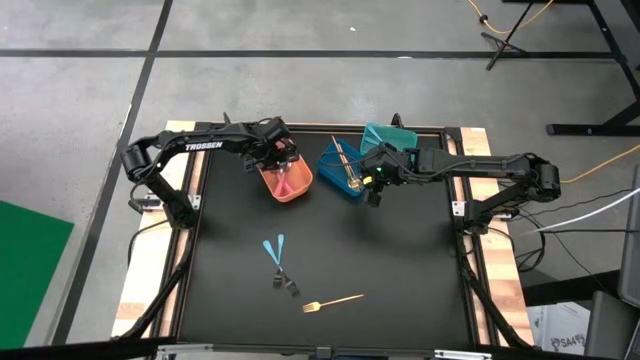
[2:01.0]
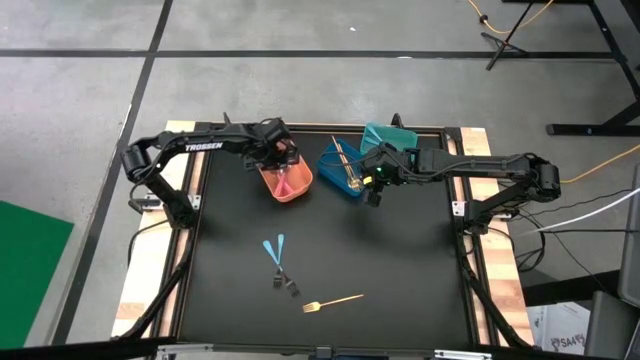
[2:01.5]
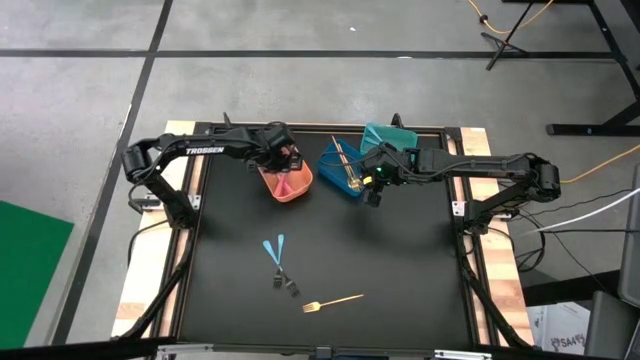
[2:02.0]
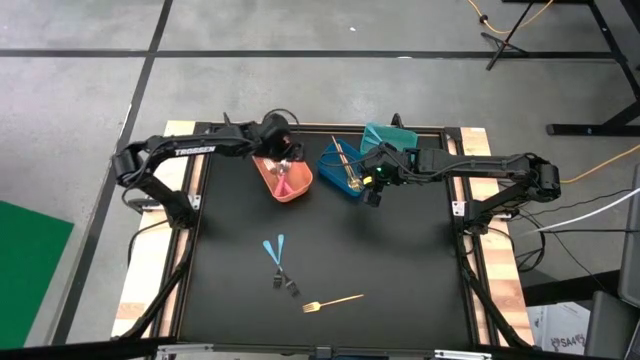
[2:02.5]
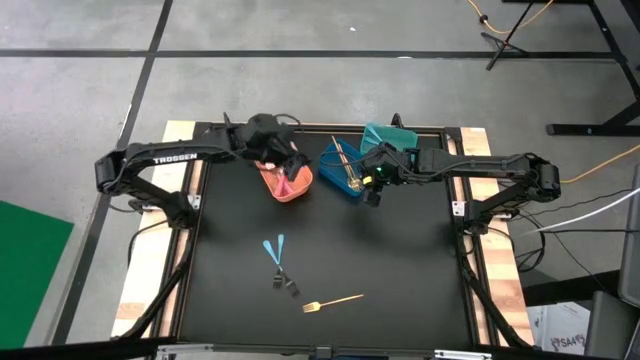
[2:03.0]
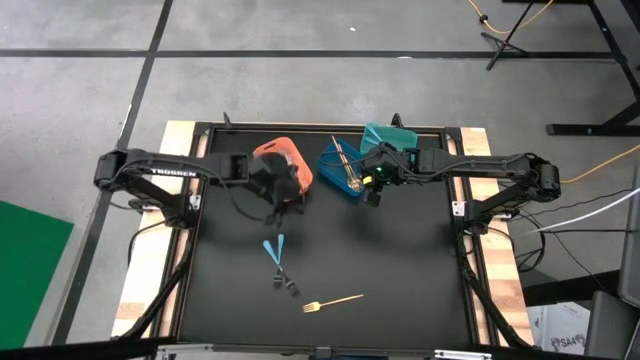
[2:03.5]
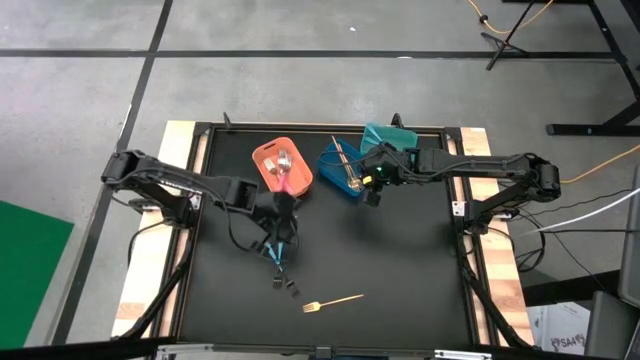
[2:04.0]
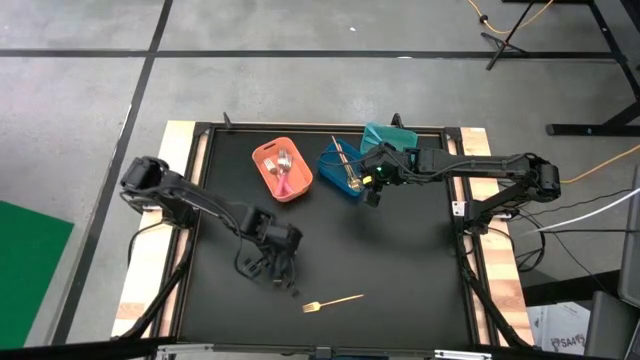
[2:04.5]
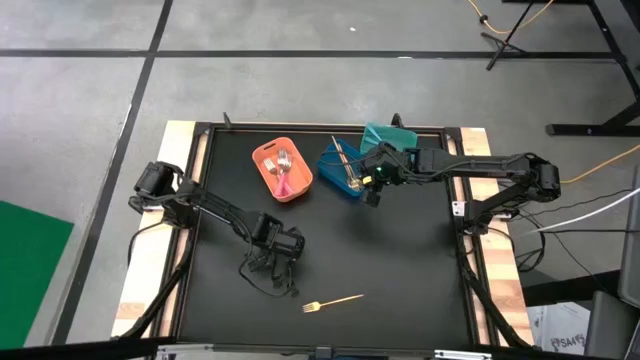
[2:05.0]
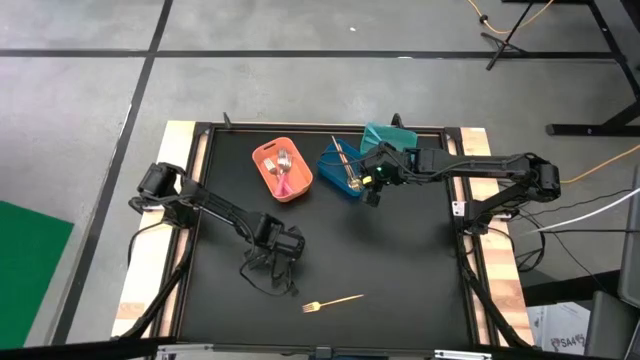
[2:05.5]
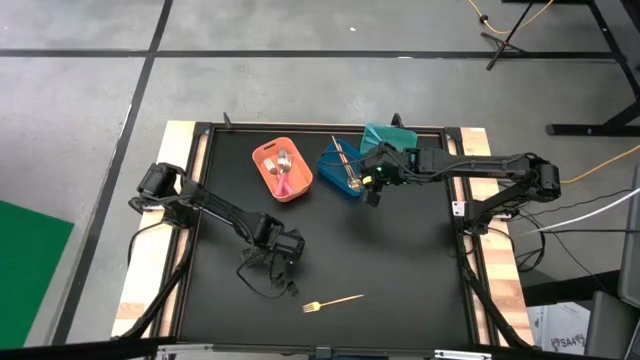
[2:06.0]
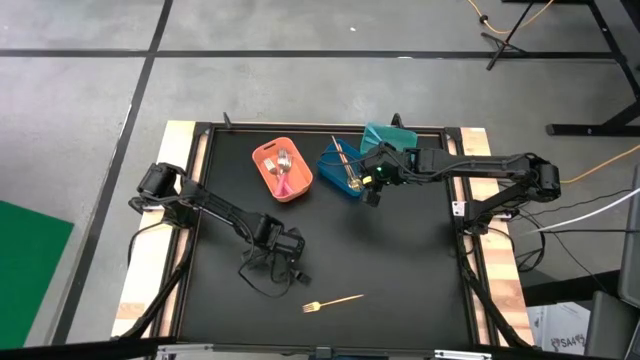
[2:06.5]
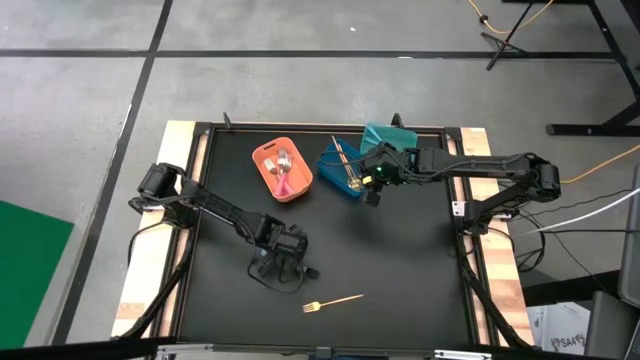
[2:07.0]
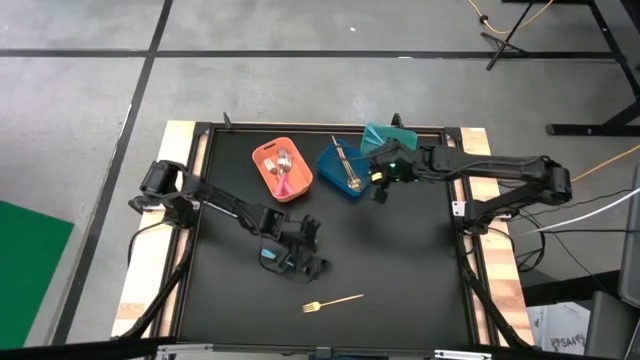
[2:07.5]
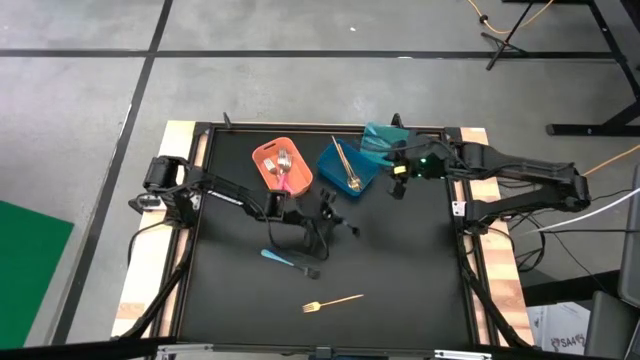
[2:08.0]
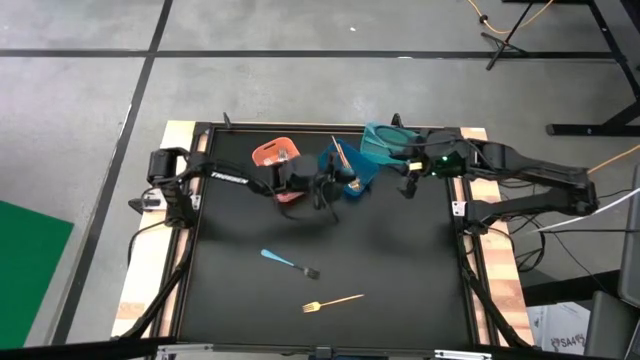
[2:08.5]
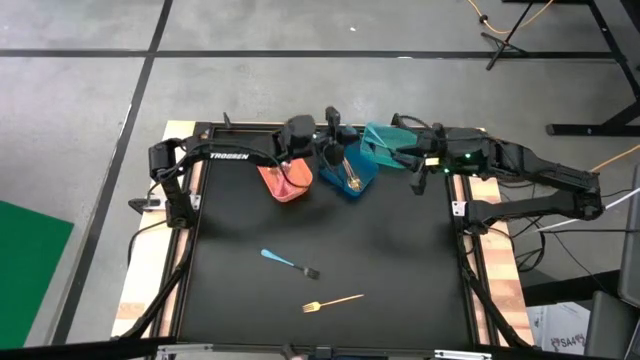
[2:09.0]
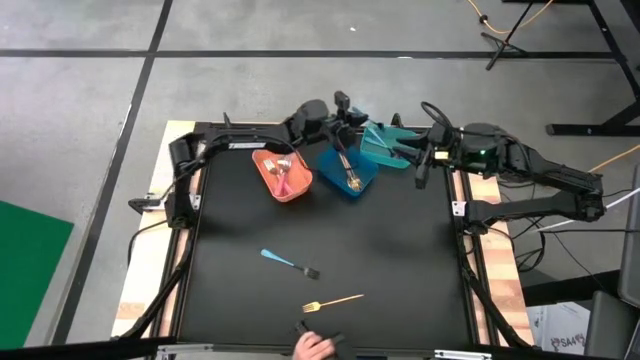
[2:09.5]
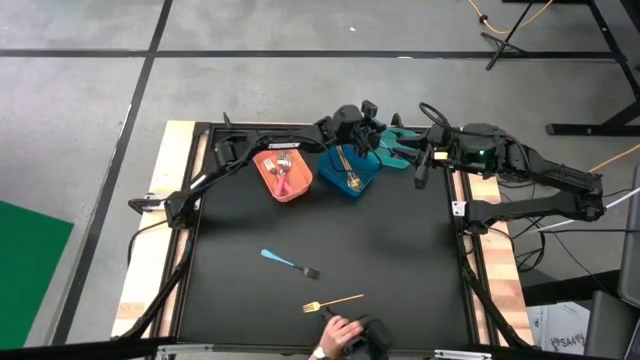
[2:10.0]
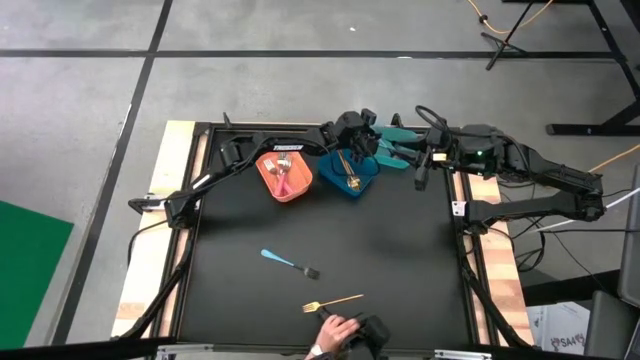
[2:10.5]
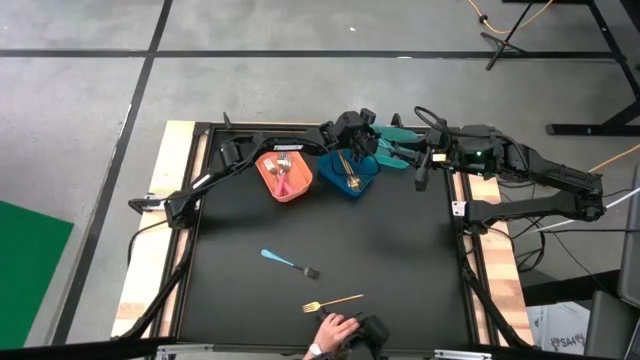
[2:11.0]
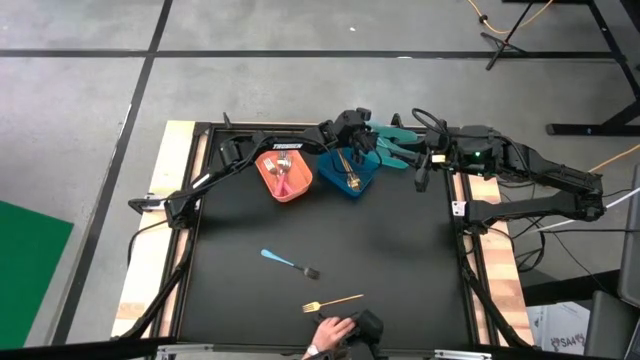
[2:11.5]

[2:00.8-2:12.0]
Task: Sort silverware by color (type)
Put the blue fork into the green bin

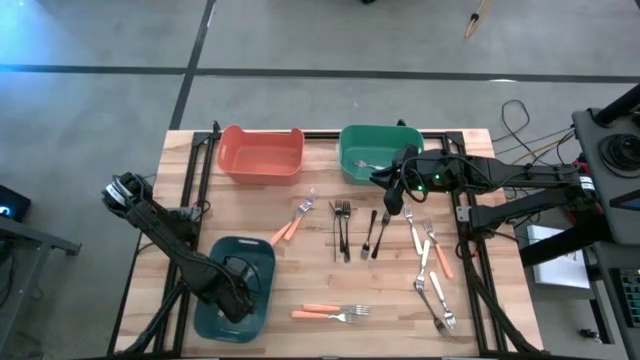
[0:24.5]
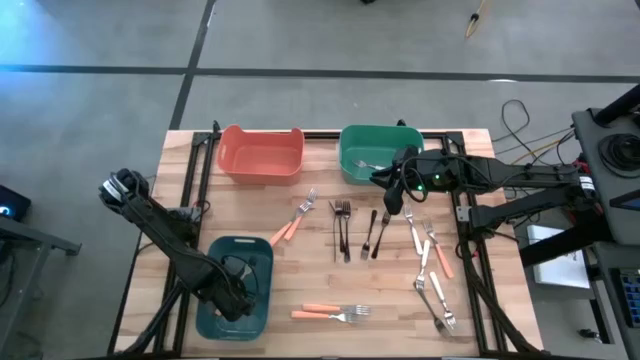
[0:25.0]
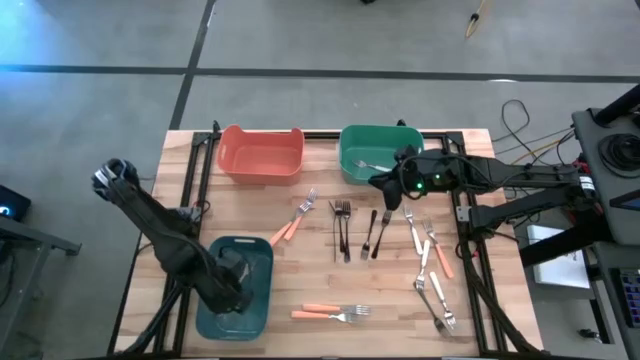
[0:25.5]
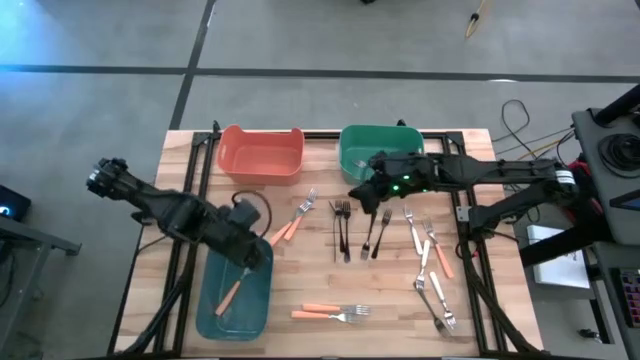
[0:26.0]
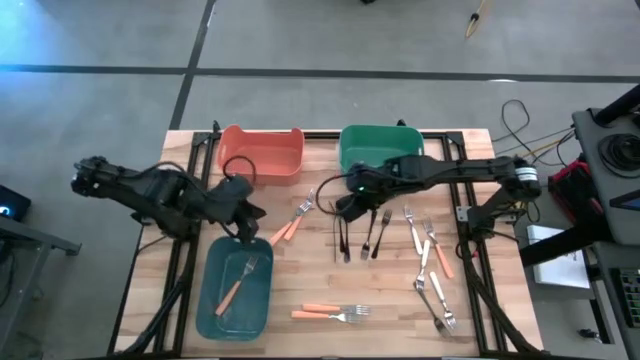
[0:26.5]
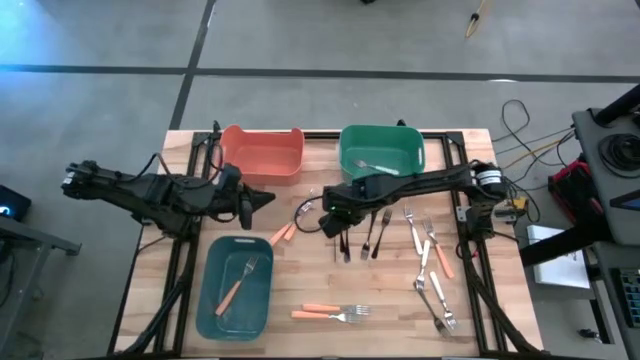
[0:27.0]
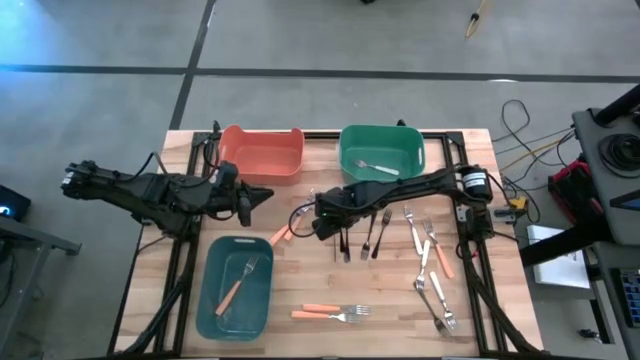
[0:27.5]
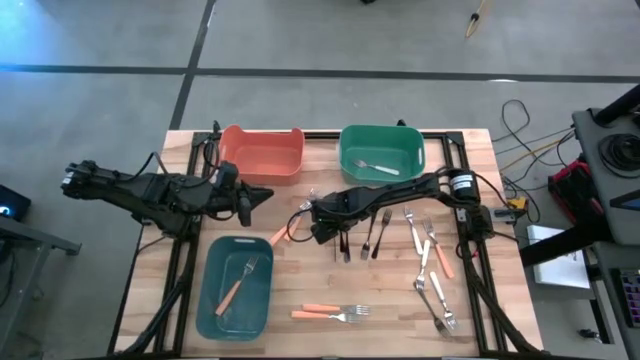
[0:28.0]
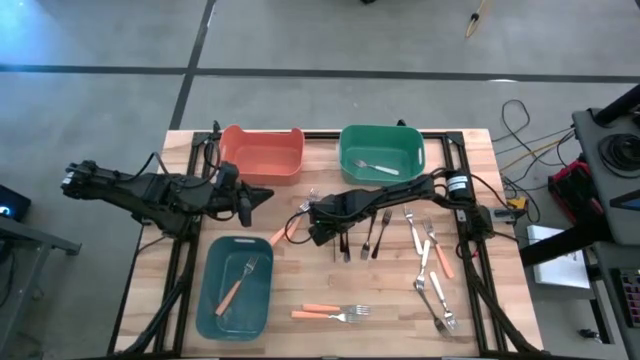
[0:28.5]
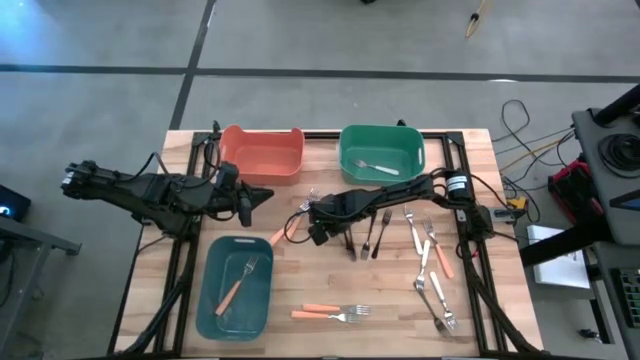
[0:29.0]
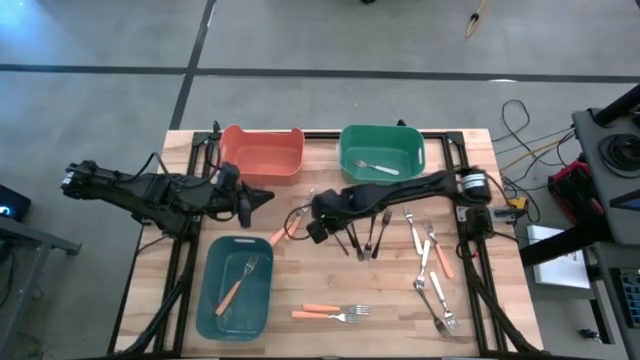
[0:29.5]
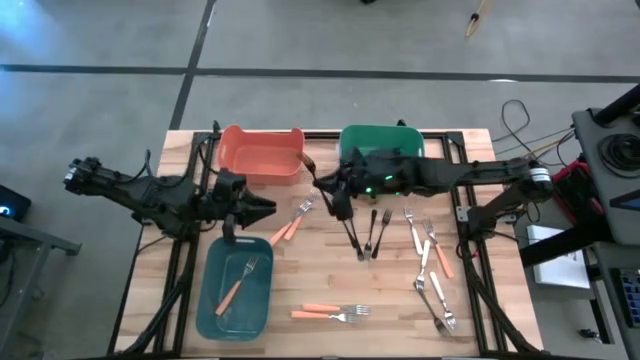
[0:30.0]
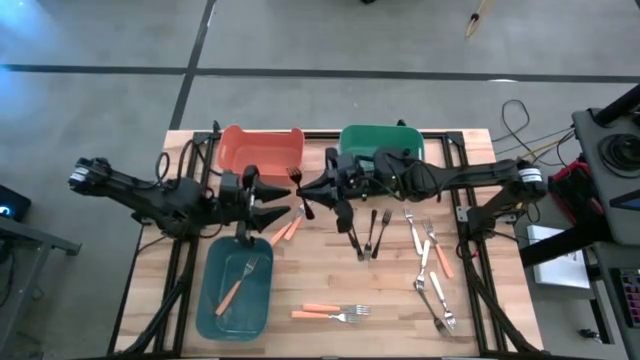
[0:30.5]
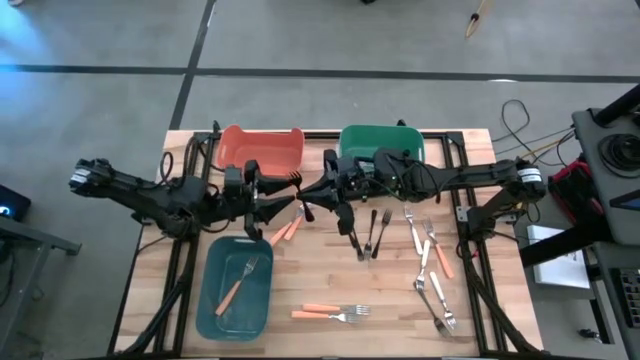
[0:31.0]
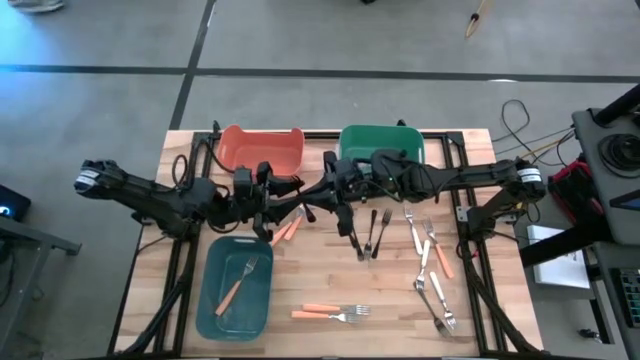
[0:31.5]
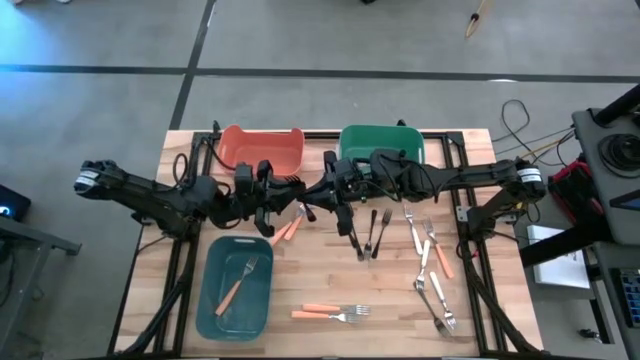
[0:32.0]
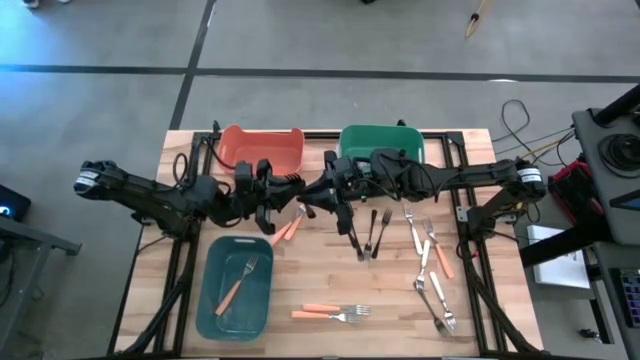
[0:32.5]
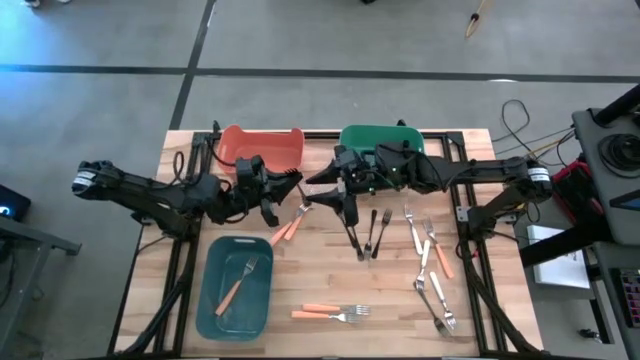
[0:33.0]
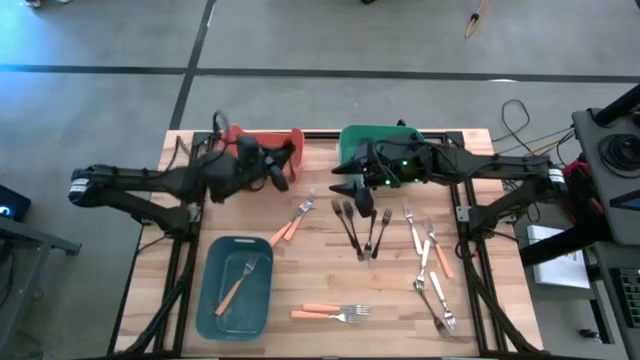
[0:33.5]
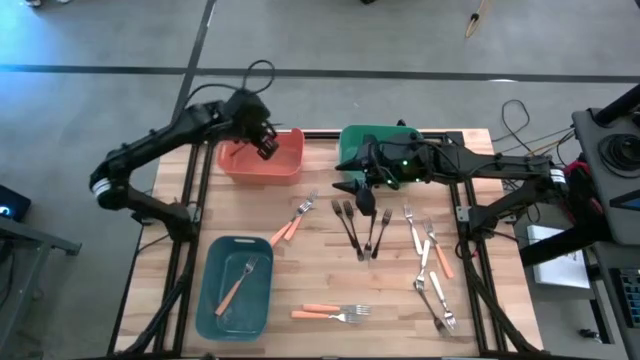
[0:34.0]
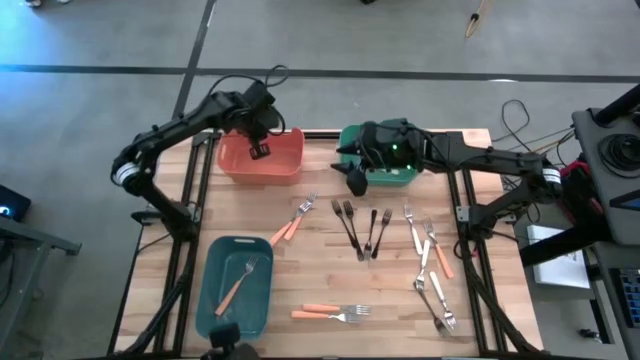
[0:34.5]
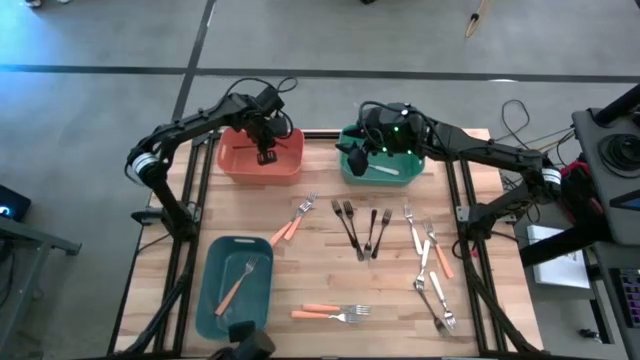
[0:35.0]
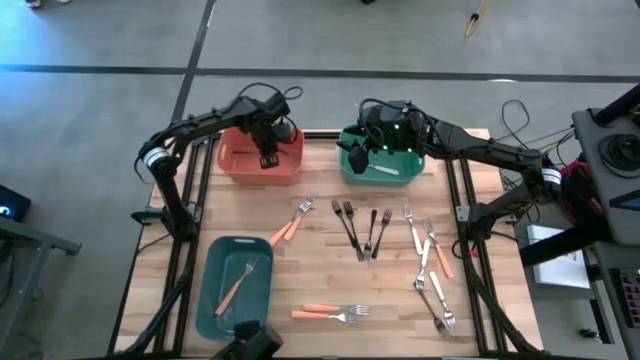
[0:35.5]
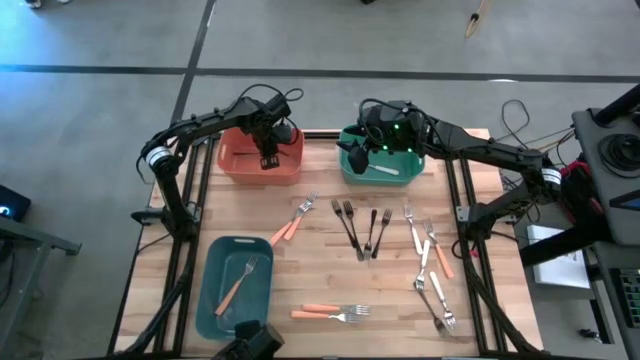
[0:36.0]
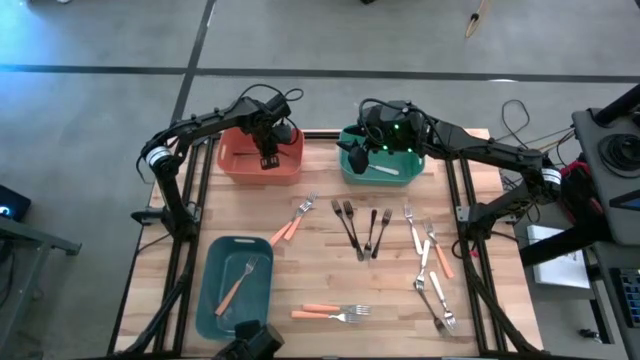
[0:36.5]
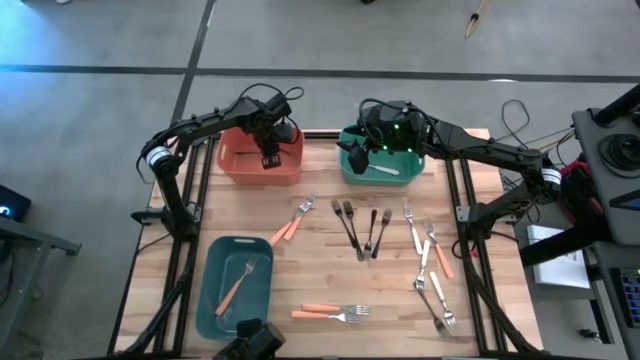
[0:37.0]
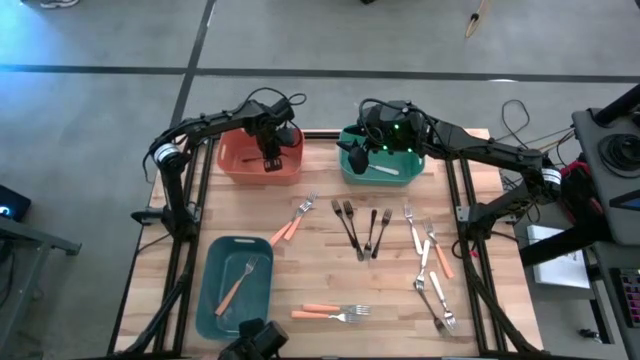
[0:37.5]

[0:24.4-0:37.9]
Task: Sort silverware by color (type)
Put the black fork into the orange bin
